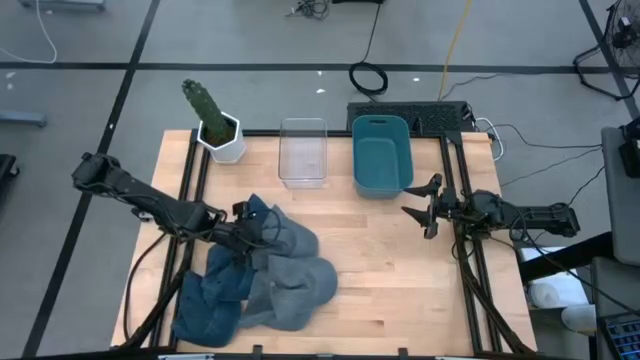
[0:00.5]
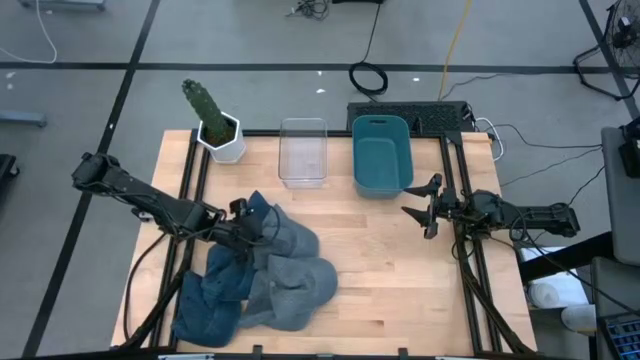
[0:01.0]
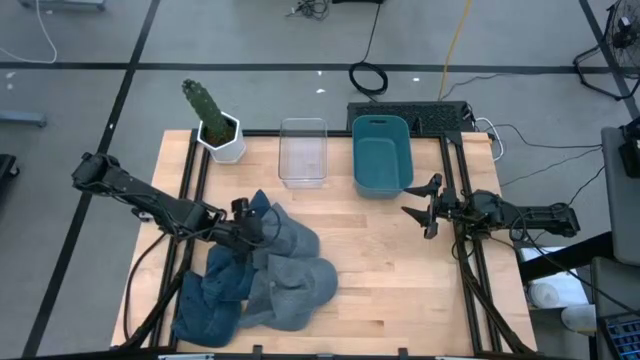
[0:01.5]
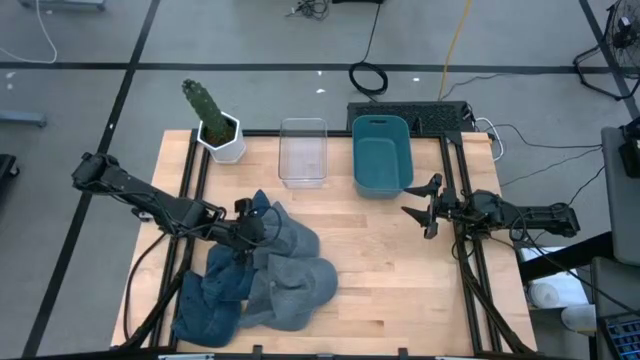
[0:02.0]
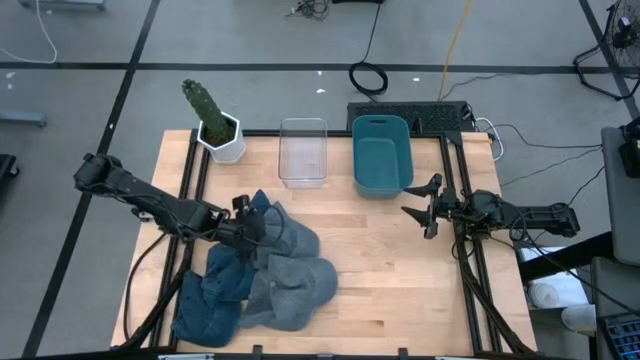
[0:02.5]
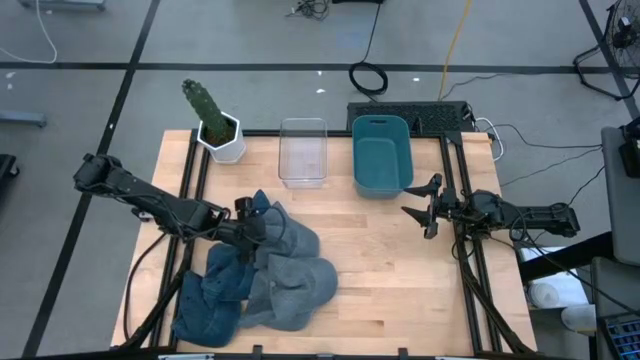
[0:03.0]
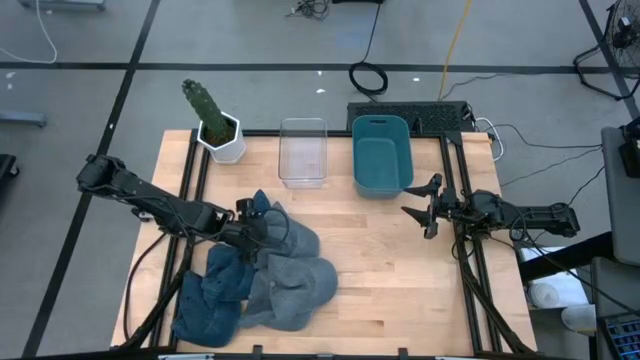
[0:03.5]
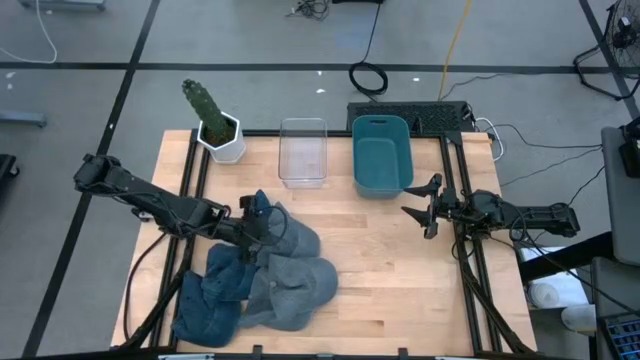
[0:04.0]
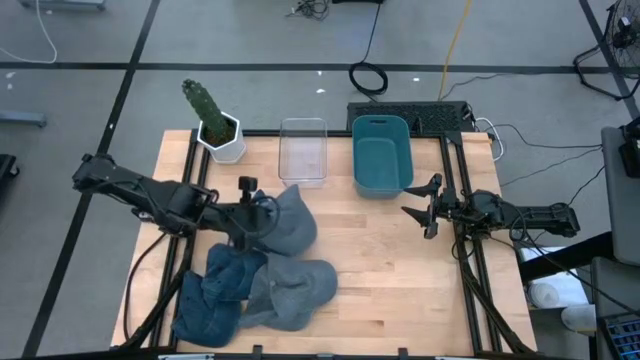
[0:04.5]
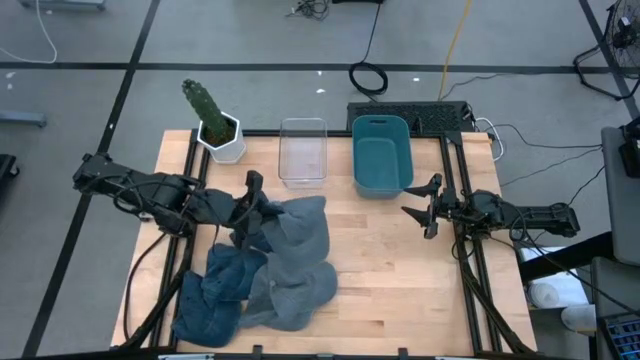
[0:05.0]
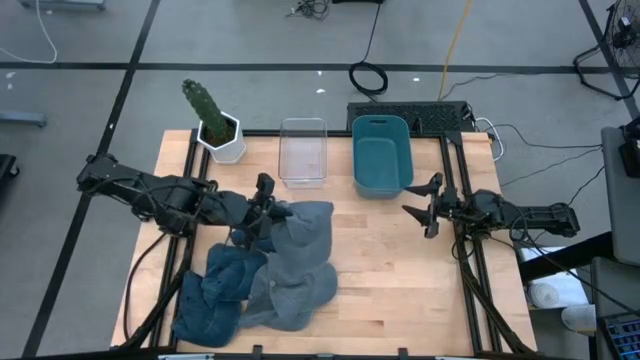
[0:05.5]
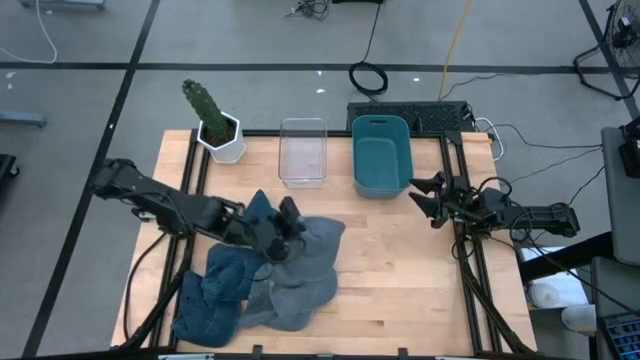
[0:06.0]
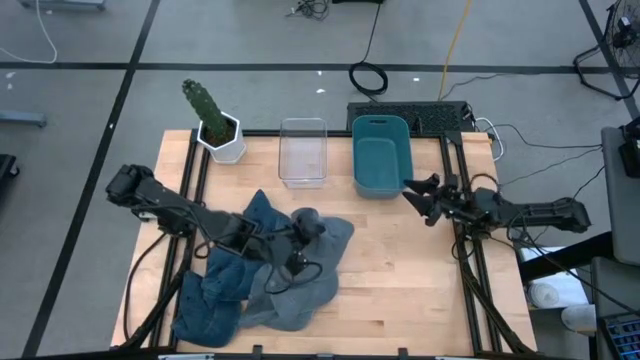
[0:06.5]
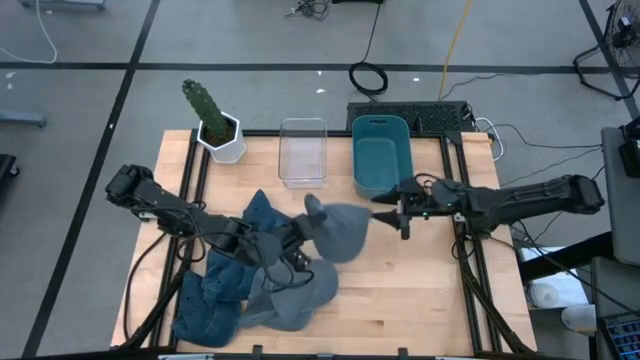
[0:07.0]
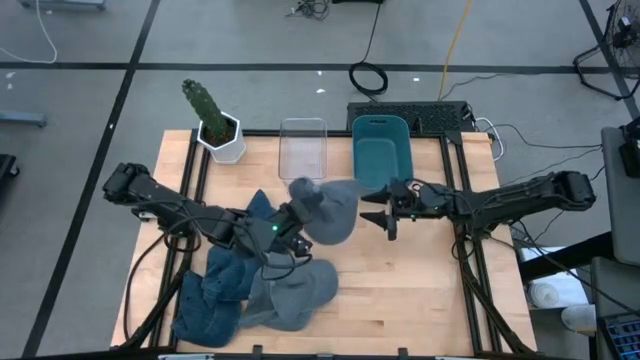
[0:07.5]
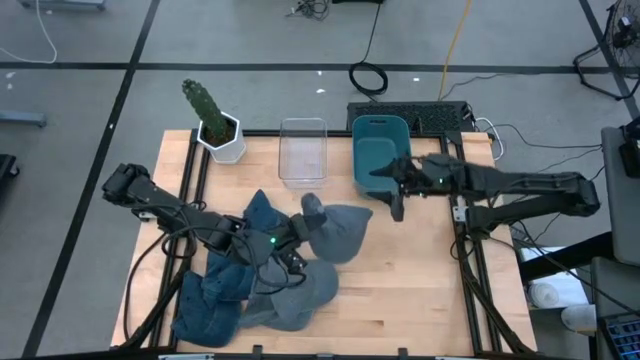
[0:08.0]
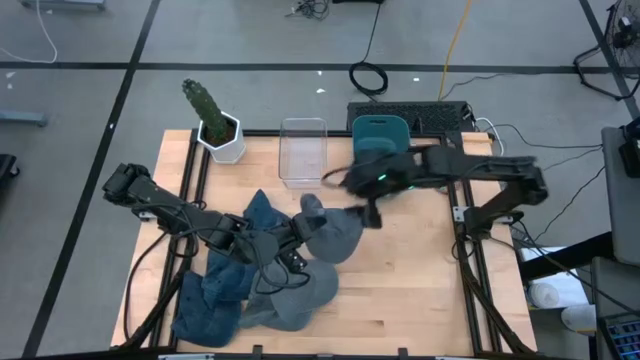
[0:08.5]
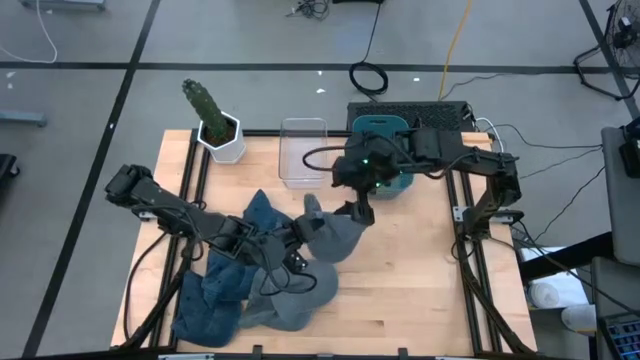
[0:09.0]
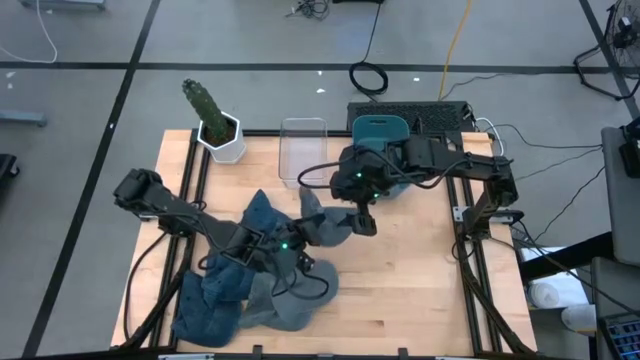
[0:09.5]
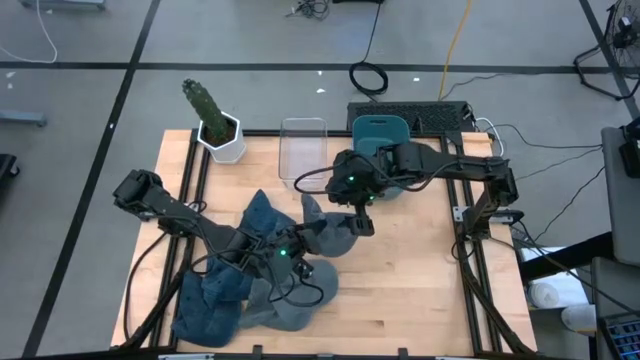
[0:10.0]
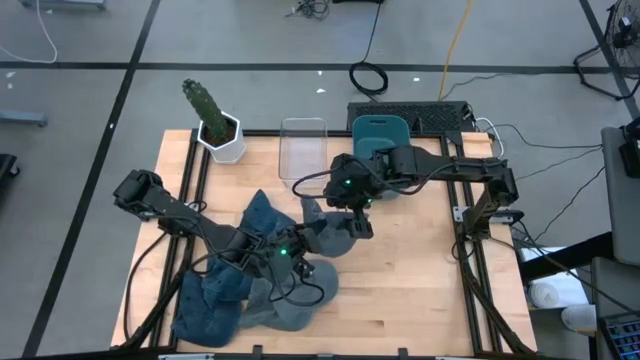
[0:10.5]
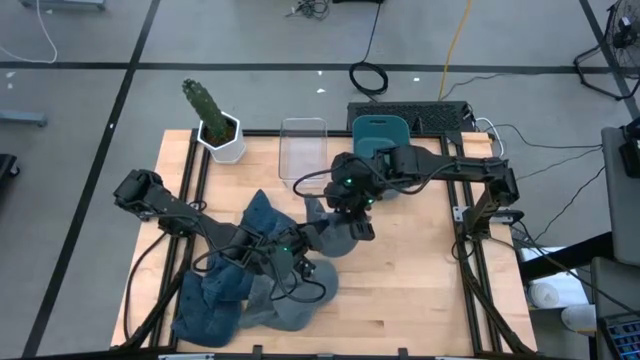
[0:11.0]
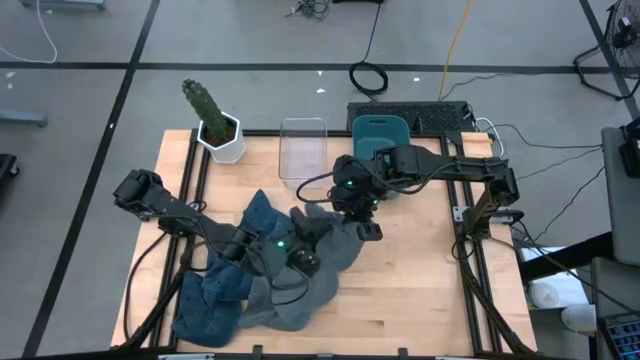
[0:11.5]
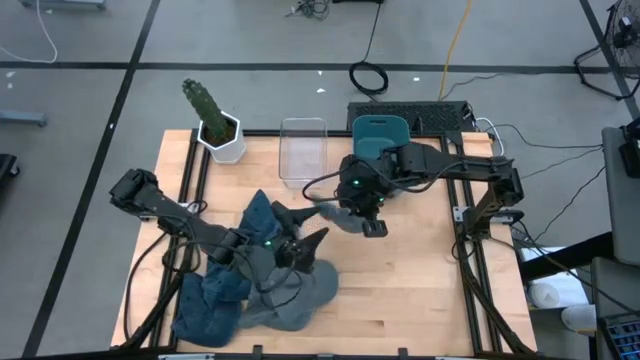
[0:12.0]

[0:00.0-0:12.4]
Task: Pick & Place hat
Put the top gray cap into the blue bin

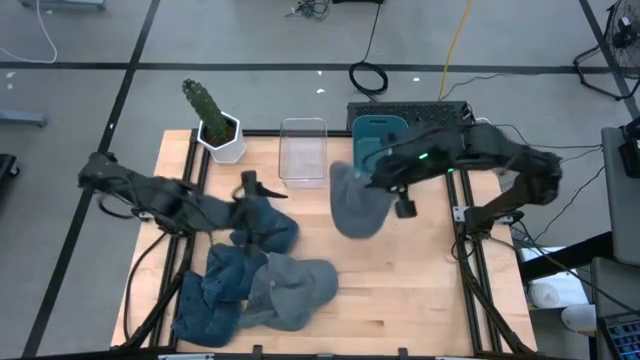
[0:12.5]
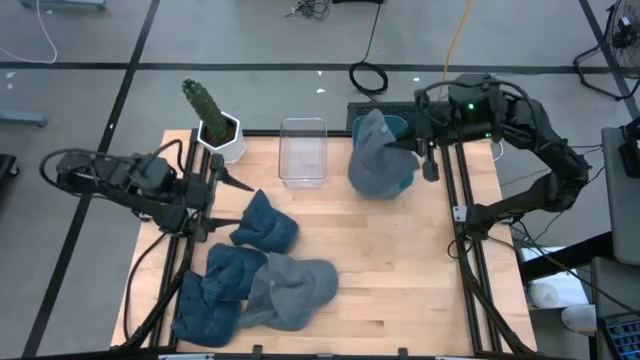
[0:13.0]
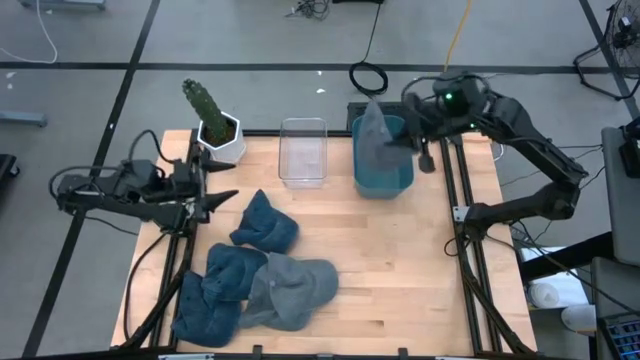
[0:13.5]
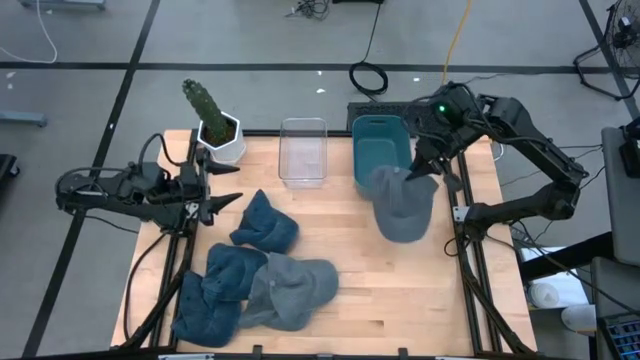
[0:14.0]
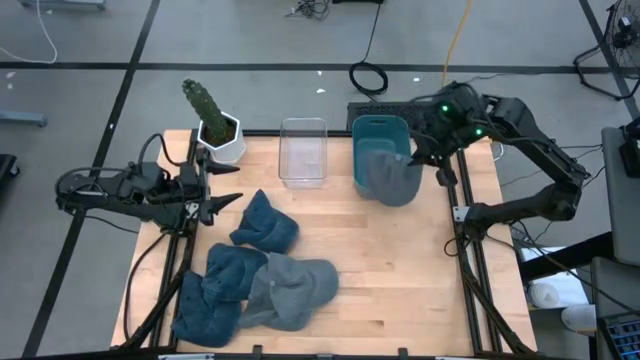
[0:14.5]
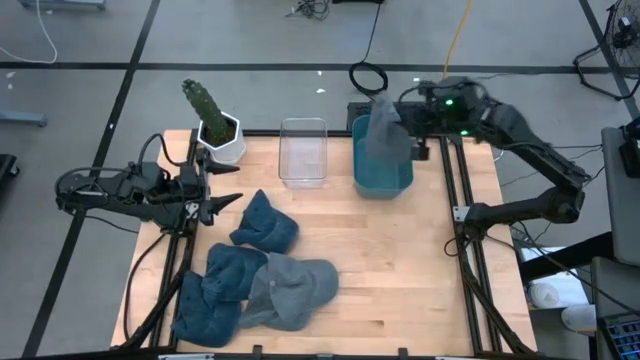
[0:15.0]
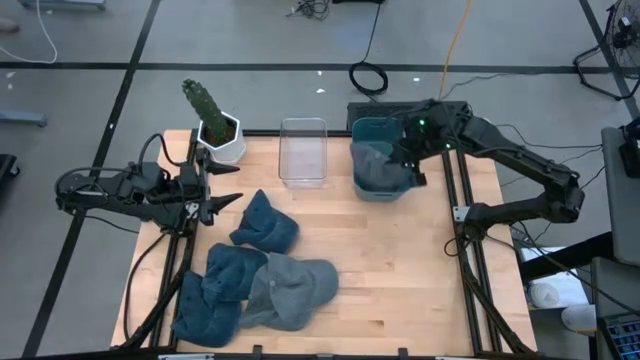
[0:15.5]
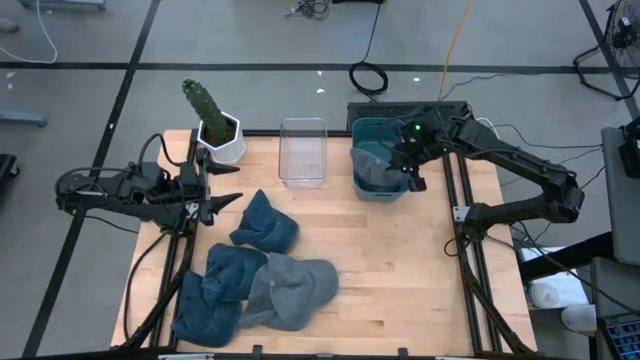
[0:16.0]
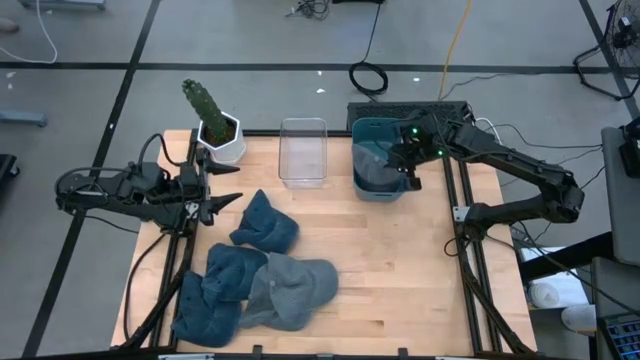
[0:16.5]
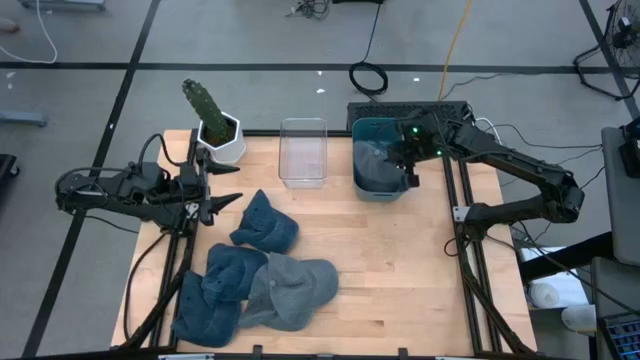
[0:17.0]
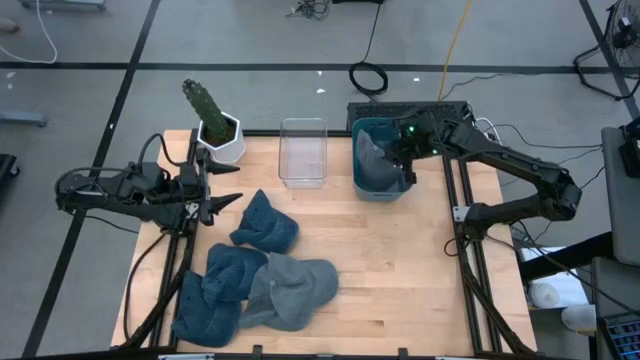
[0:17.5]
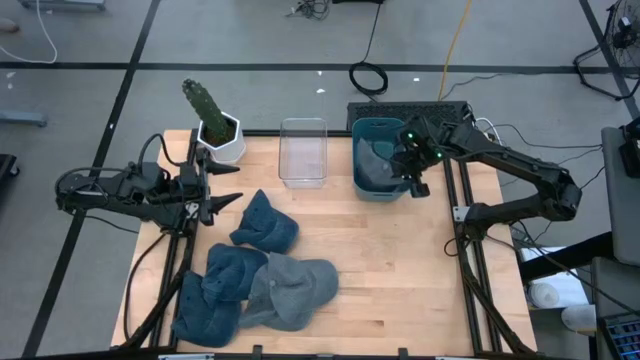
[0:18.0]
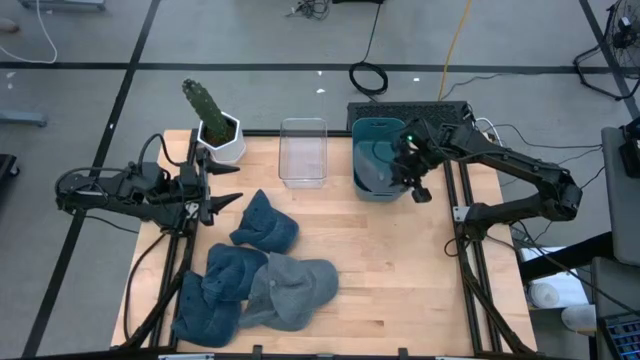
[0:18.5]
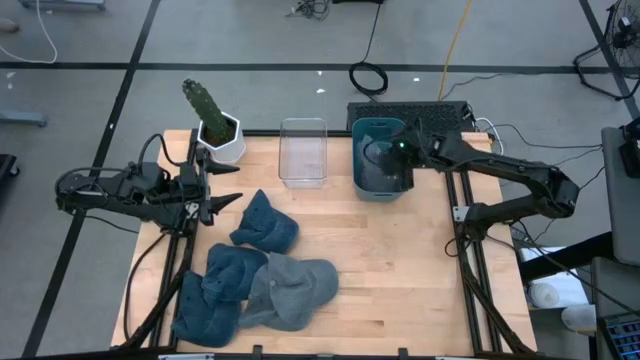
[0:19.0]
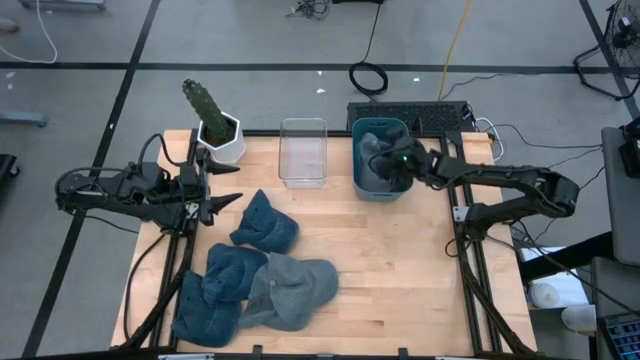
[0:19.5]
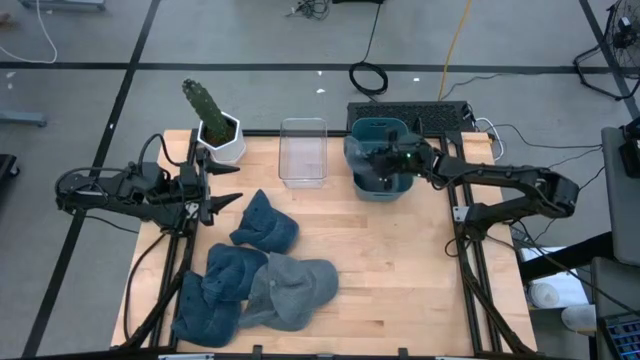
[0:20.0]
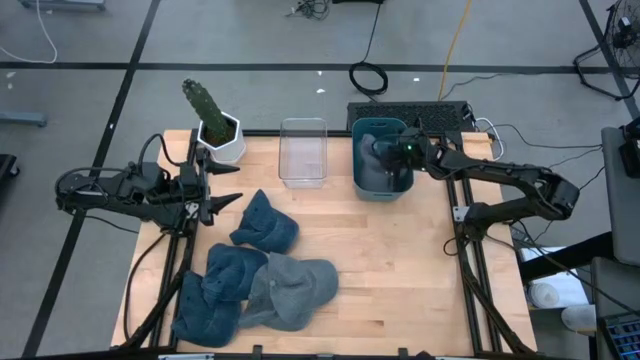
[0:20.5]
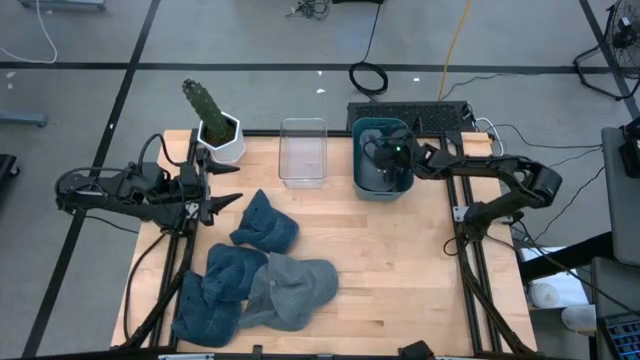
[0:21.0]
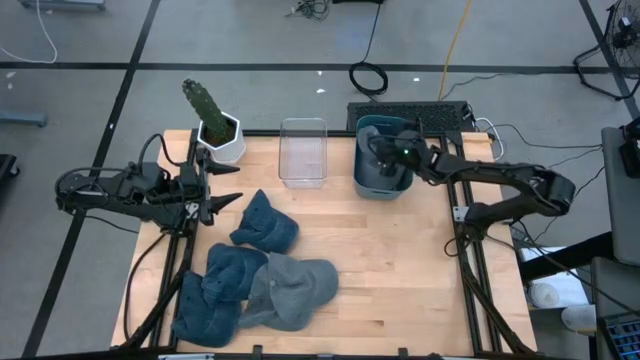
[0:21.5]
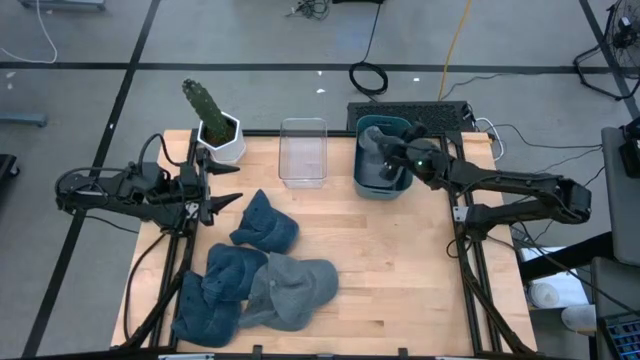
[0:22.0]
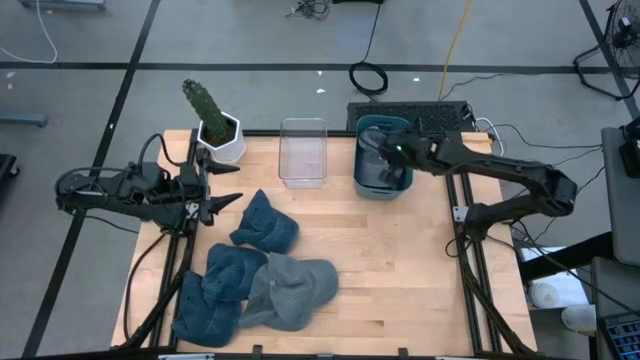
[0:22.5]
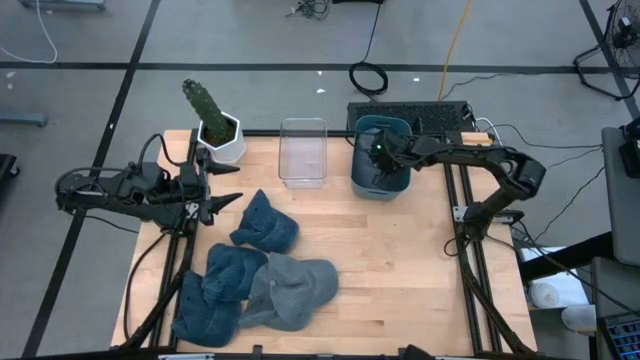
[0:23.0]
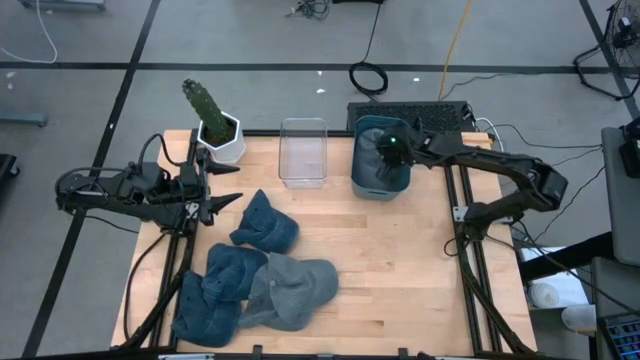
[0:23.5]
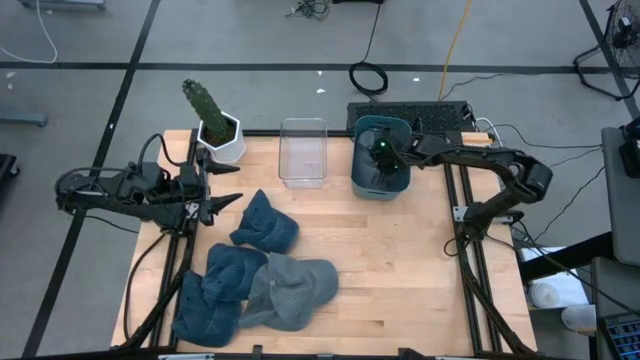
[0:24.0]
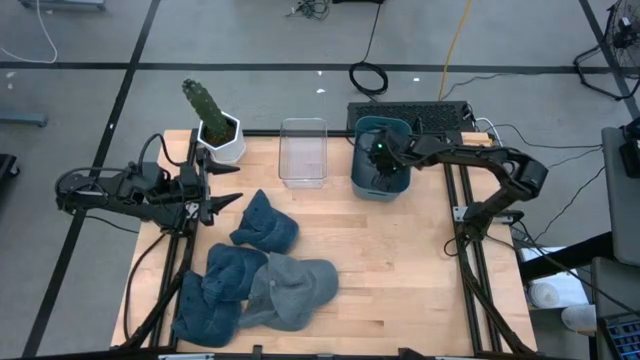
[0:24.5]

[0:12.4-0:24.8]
Put the top gray cap into the blue bin
